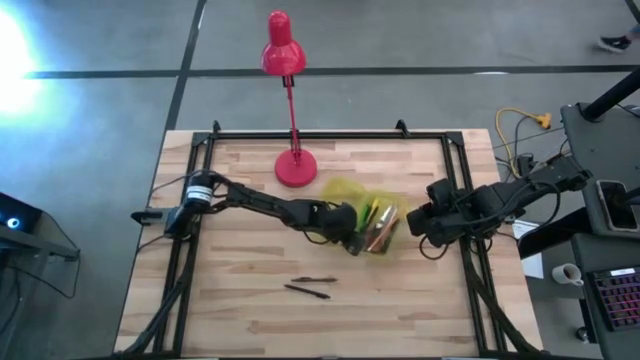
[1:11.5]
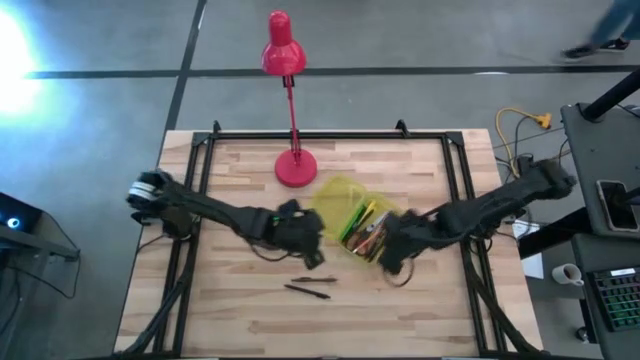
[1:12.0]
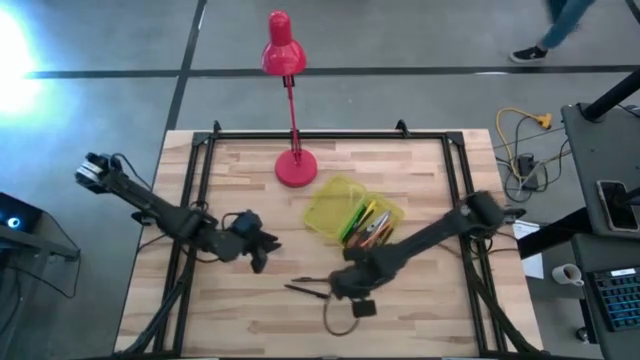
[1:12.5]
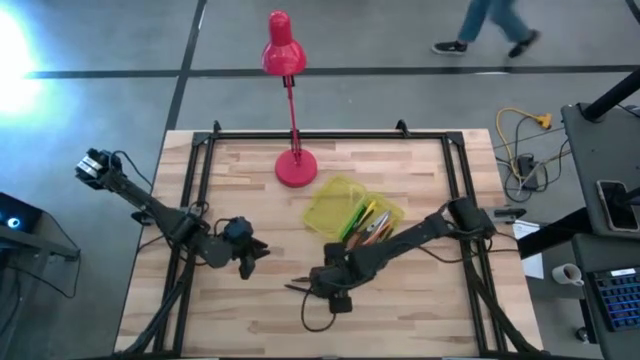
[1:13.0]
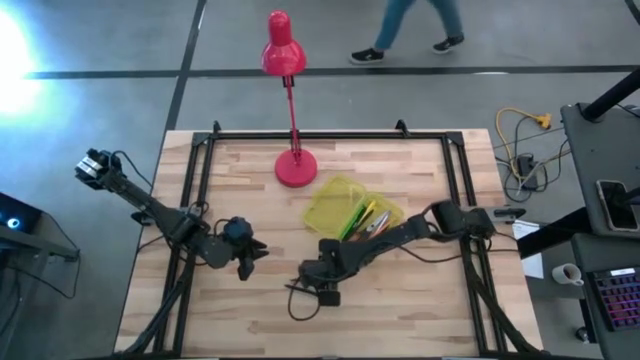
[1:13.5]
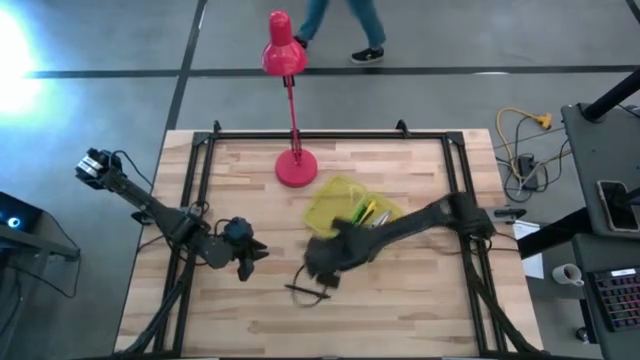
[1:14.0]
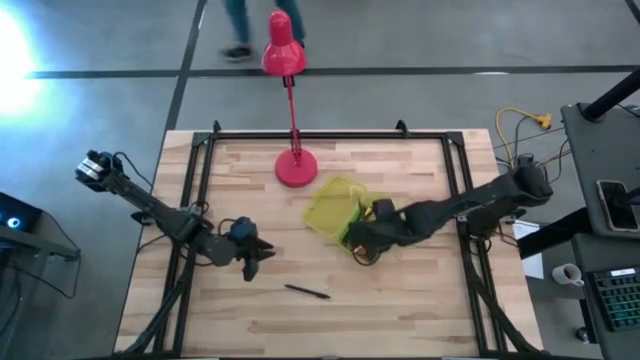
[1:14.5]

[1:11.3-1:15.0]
Task: Pick & place school supplies into a supply box
Put the brown pen into the yellow supply box

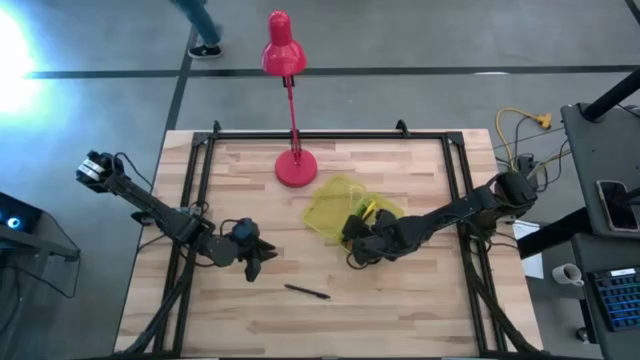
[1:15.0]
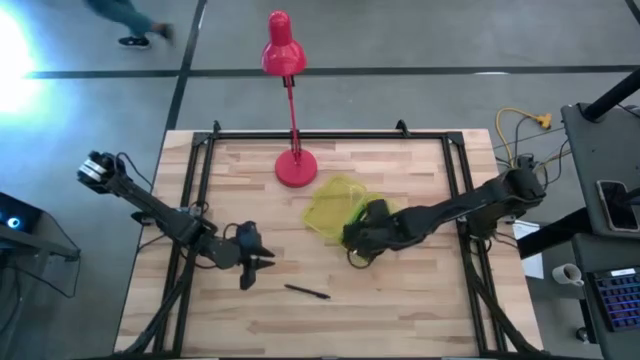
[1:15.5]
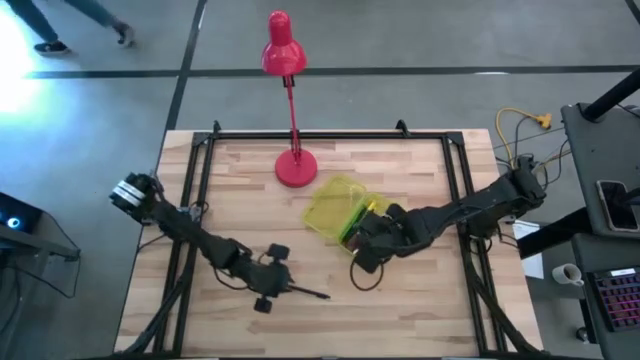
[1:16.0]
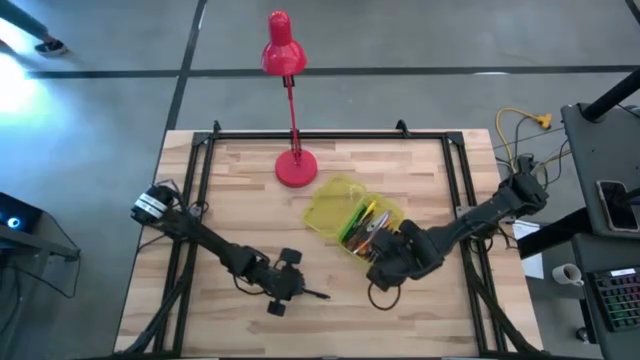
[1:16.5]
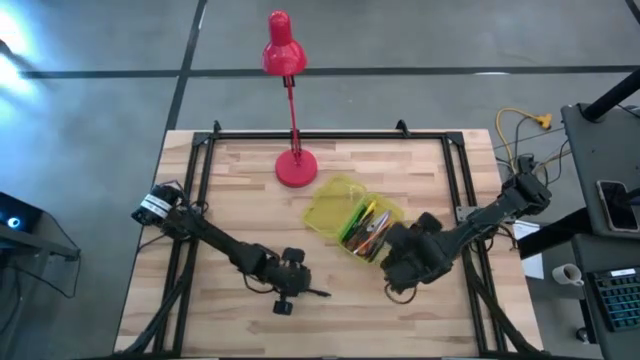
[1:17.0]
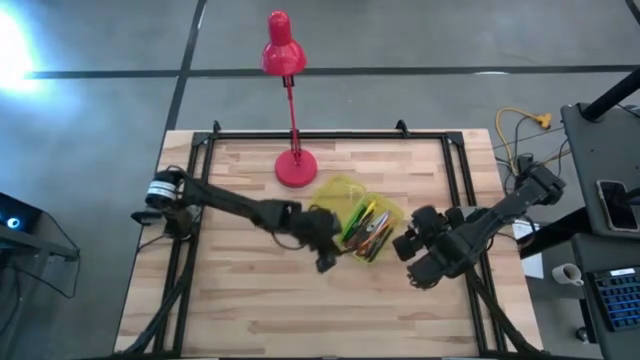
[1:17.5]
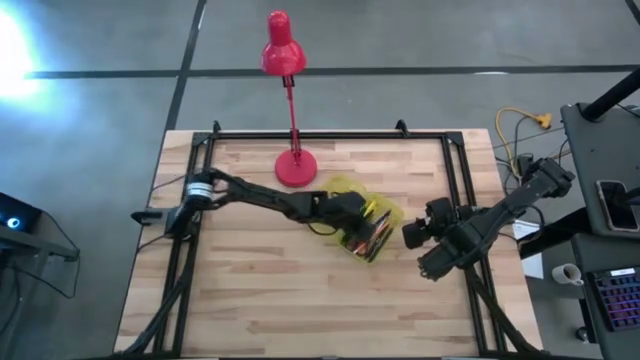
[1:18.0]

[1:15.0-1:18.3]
Put the black pen into the yellow supply box

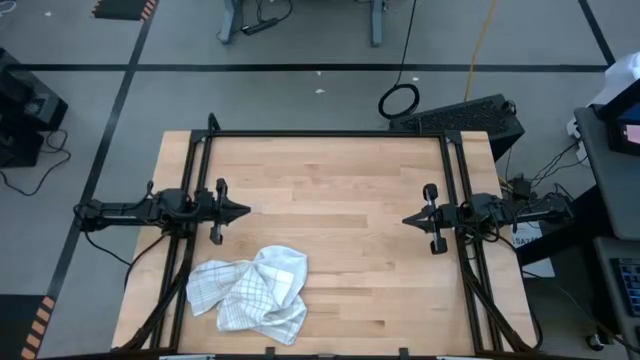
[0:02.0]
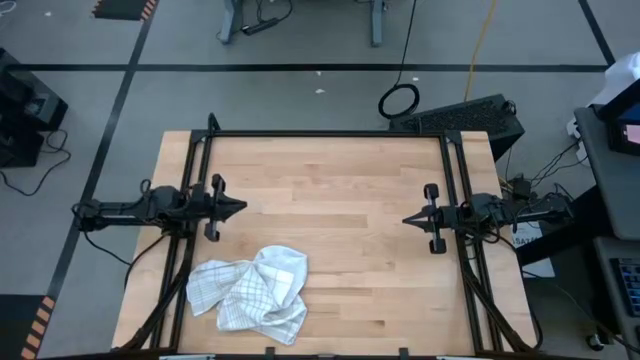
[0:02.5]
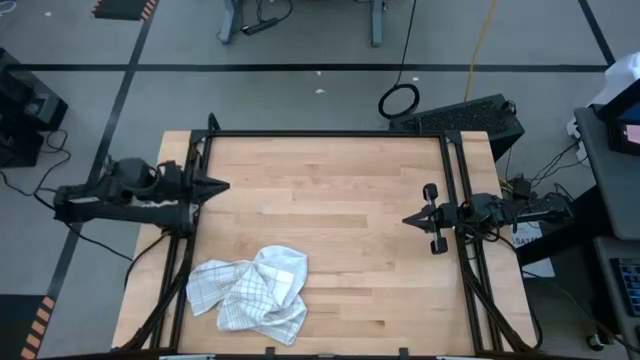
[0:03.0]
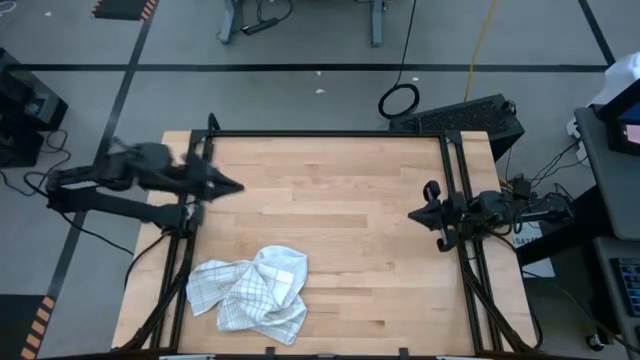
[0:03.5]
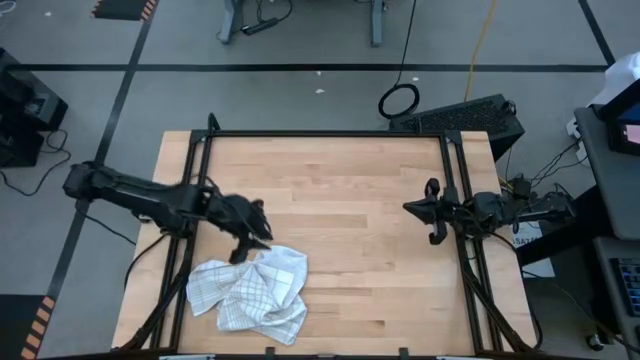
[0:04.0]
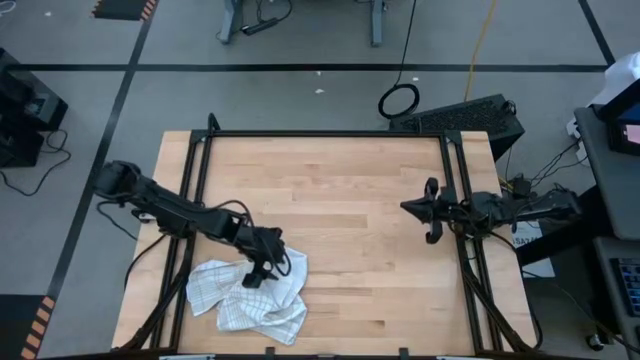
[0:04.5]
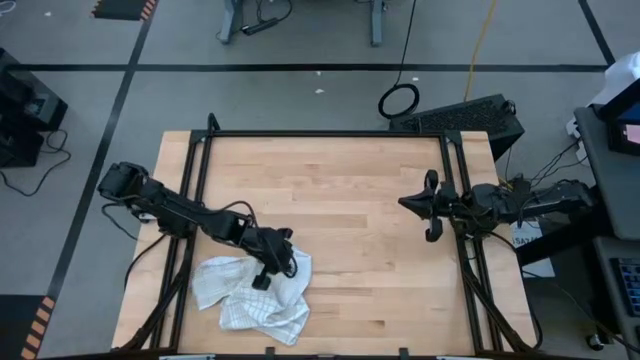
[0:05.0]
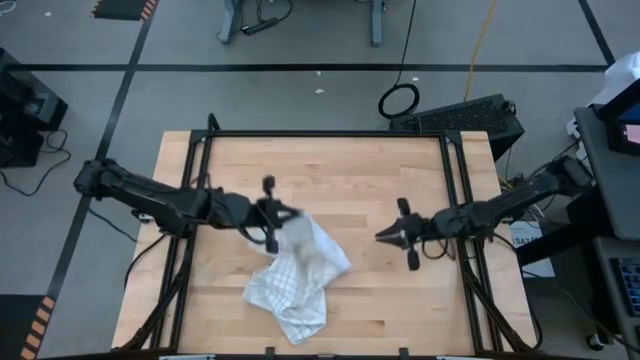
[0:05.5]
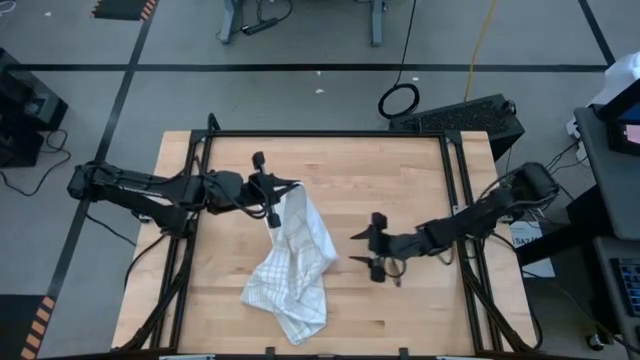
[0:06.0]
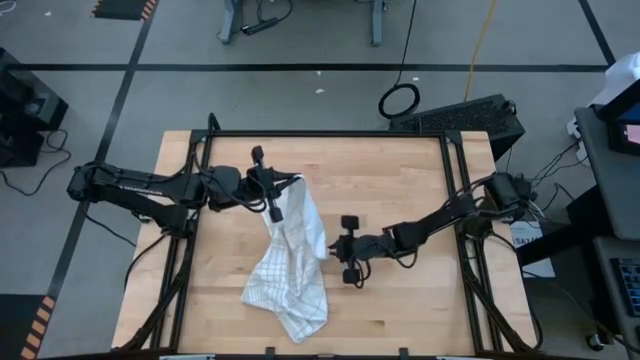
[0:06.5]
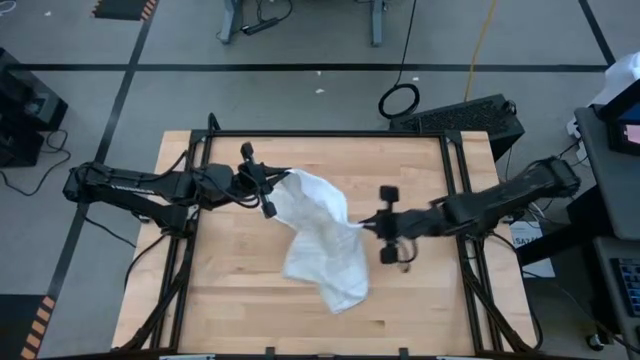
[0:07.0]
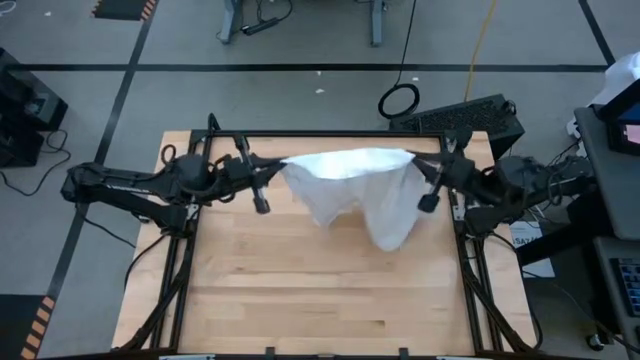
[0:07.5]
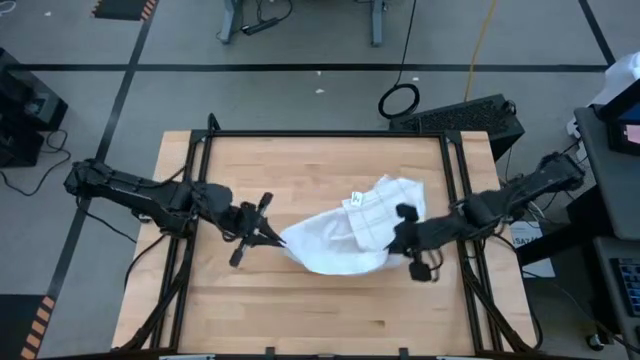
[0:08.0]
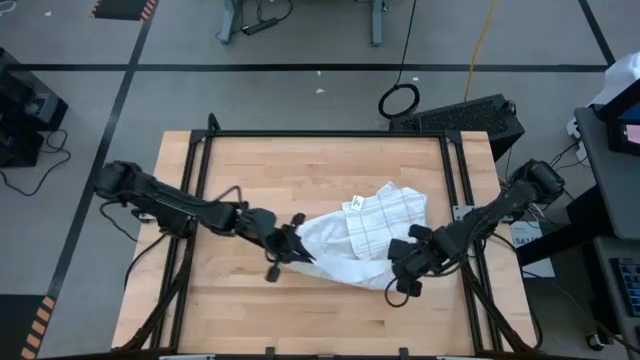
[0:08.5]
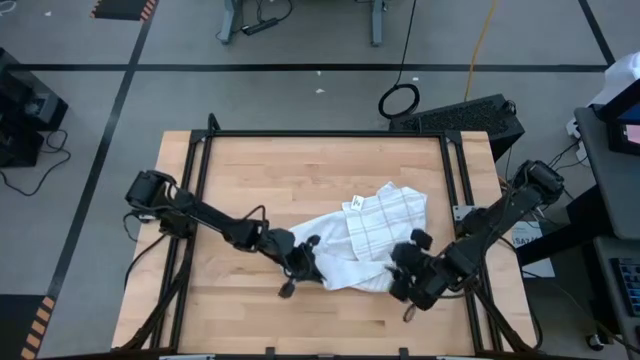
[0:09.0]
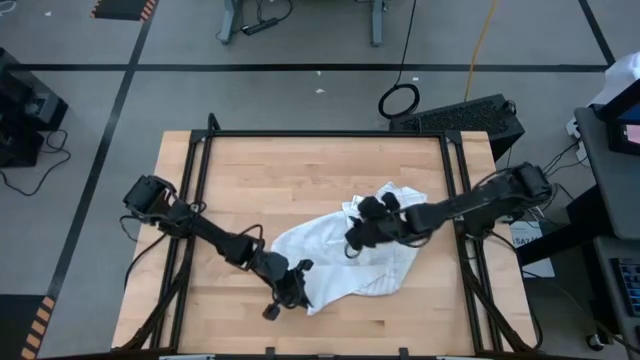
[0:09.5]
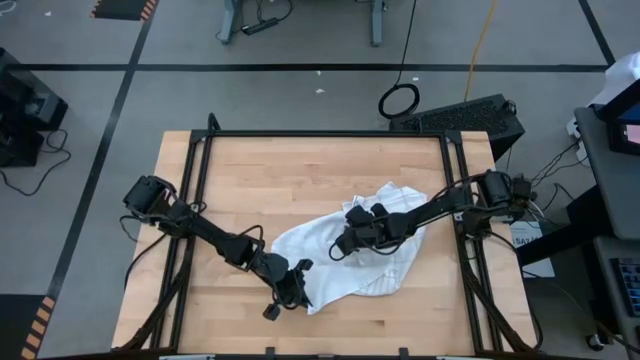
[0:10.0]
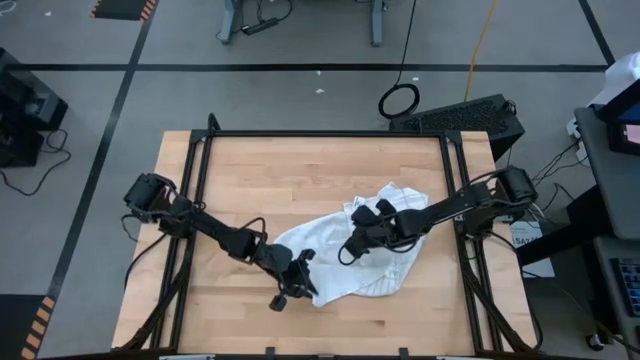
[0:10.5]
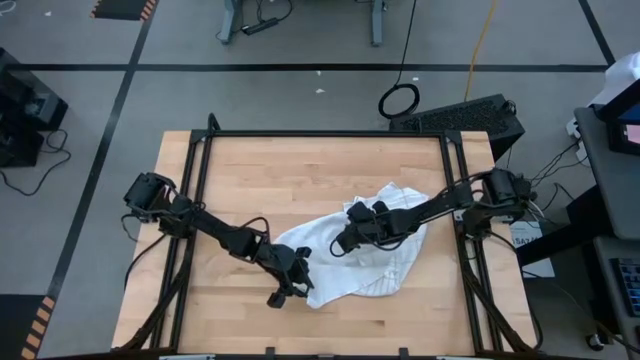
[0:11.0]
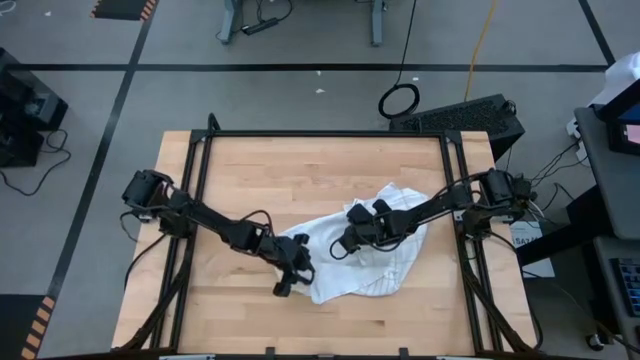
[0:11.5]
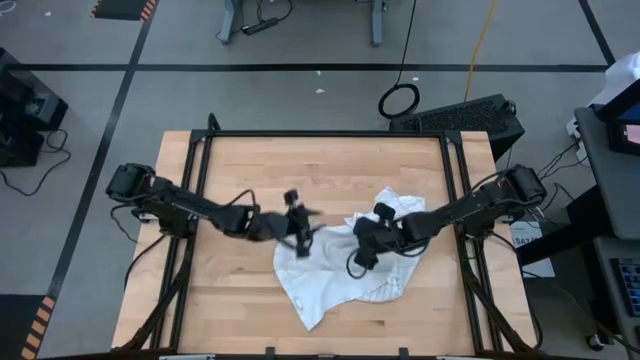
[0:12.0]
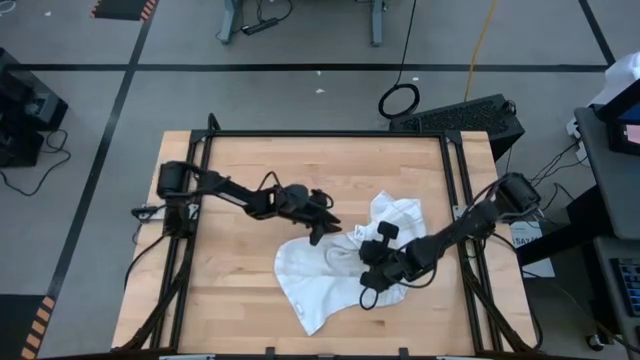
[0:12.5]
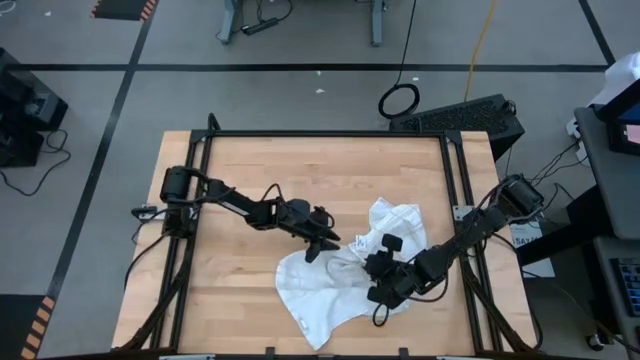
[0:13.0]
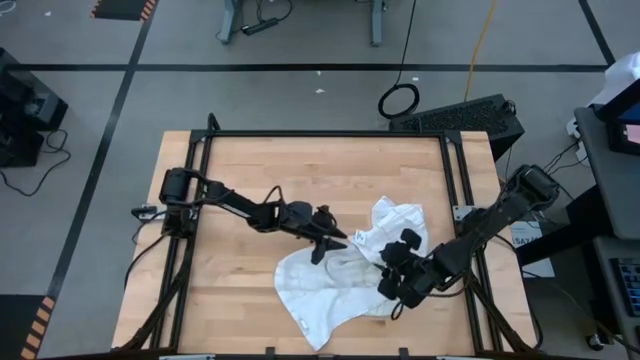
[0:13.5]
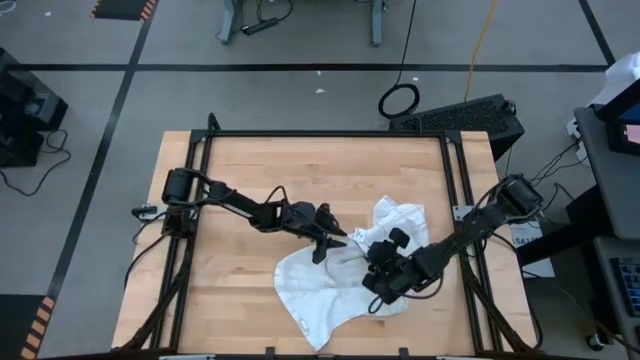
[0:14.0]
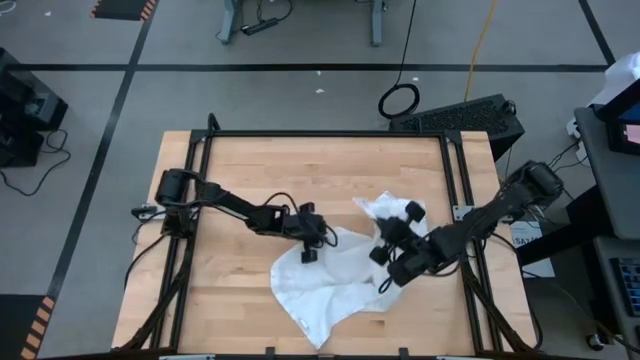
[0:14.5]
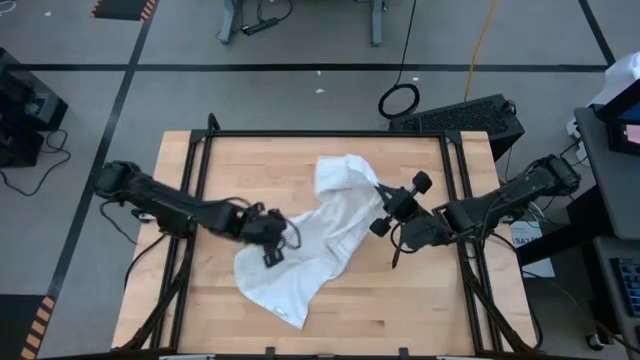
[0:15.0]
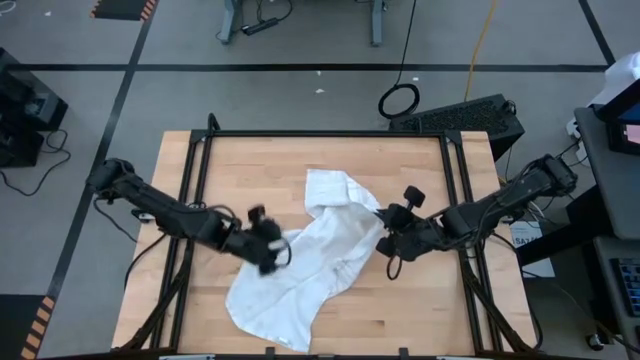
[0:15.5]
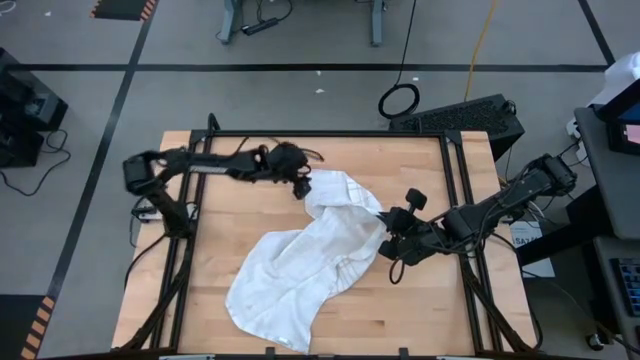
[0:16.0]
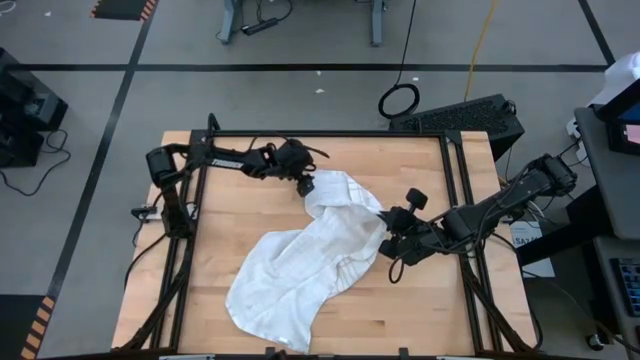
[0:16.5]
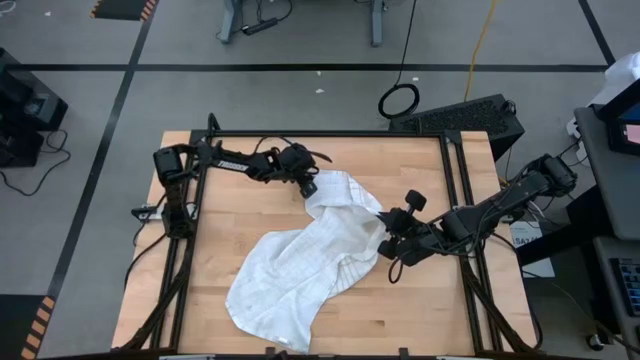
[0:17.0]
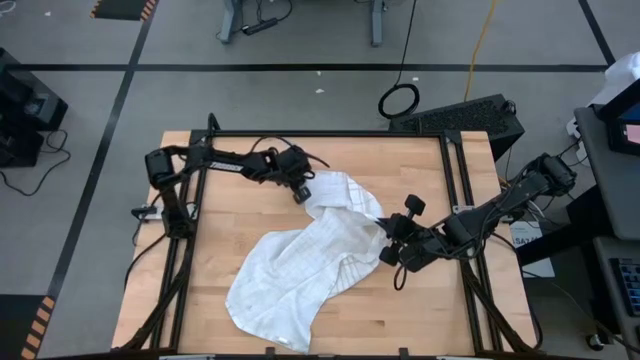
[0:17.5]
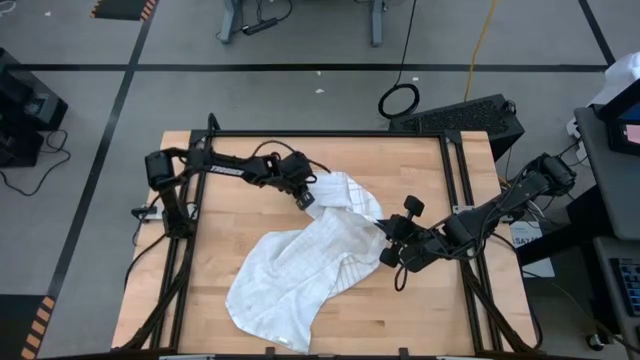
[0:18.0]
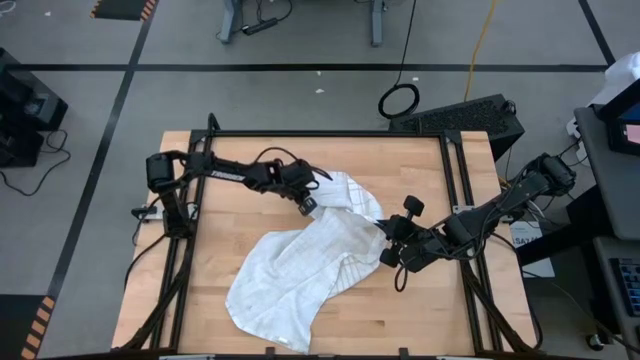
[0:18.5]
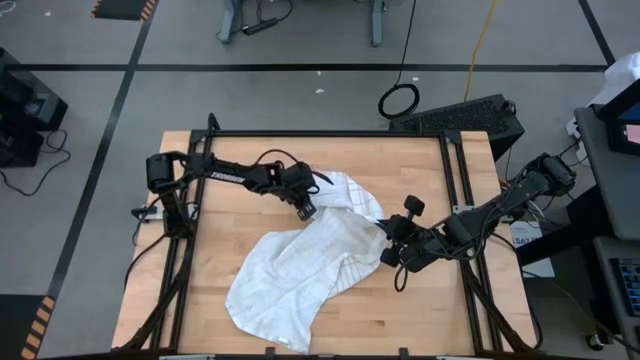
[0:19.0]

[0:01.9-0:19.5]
Task: Roll towel
Roll the white towel
